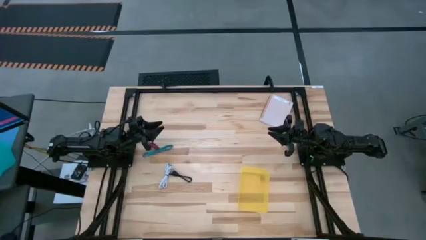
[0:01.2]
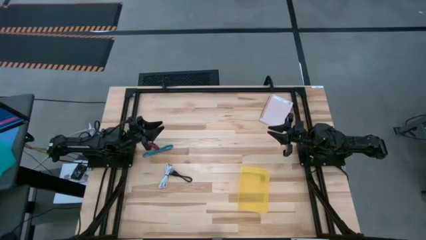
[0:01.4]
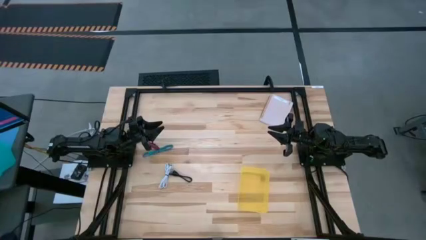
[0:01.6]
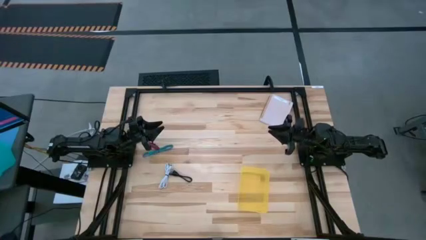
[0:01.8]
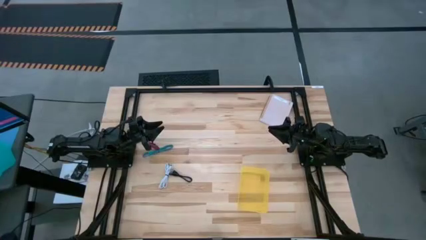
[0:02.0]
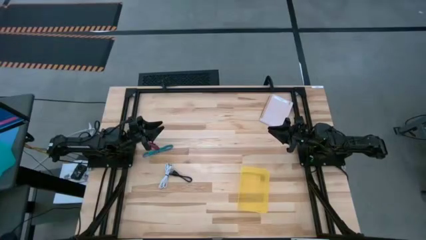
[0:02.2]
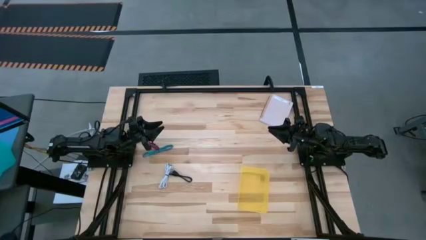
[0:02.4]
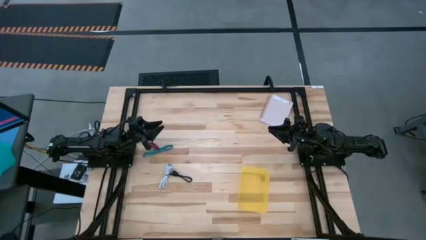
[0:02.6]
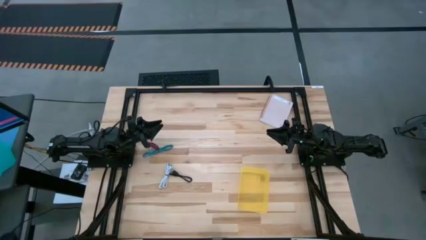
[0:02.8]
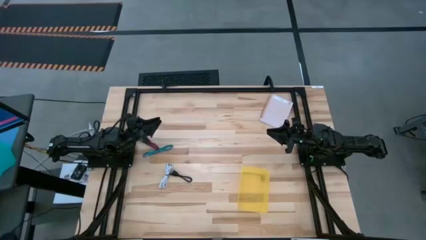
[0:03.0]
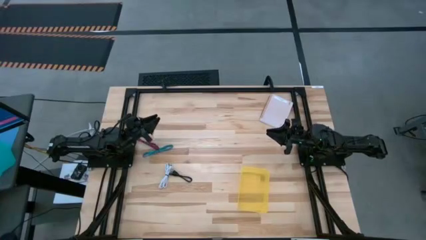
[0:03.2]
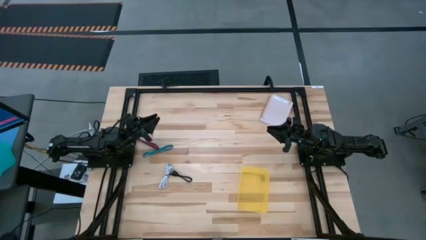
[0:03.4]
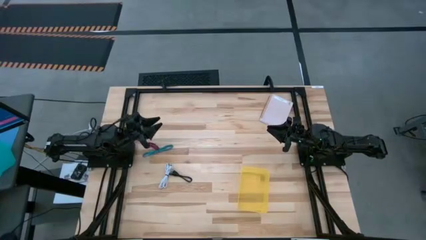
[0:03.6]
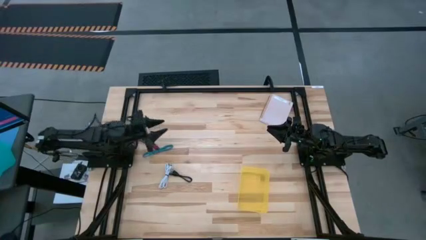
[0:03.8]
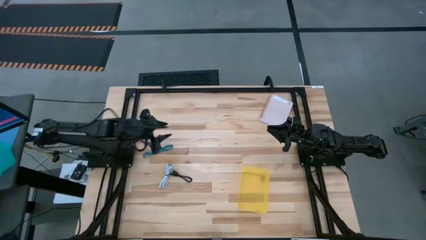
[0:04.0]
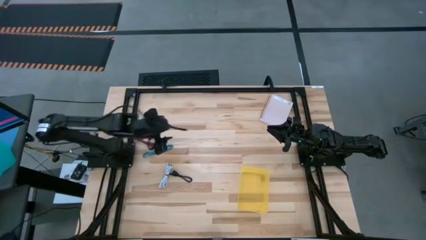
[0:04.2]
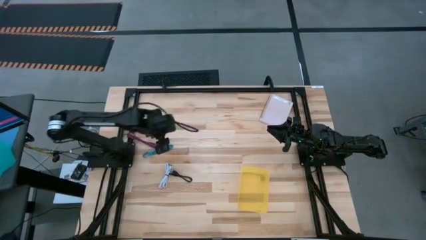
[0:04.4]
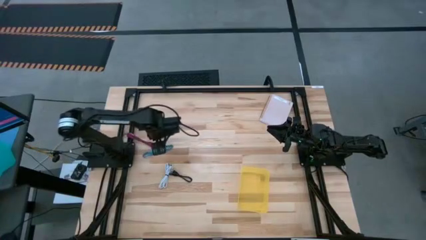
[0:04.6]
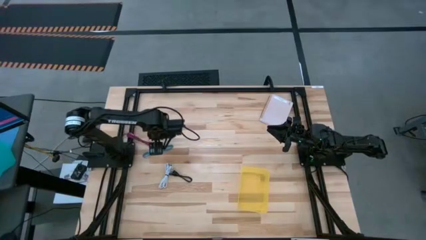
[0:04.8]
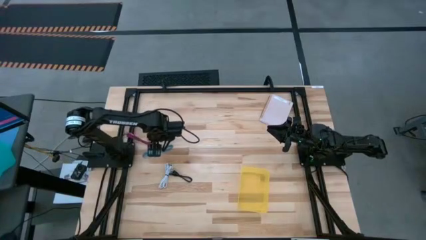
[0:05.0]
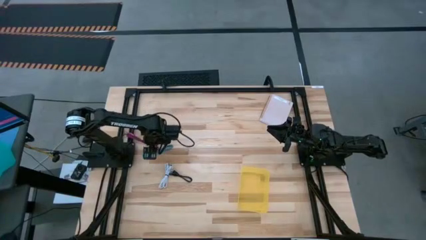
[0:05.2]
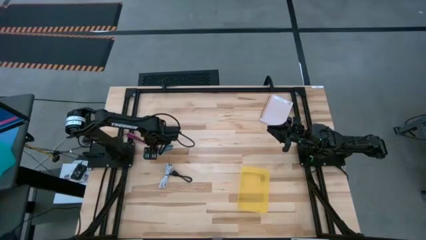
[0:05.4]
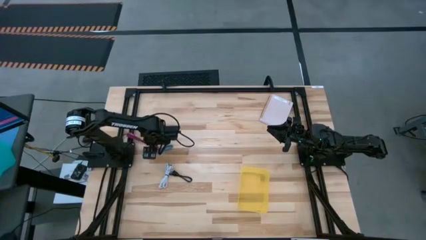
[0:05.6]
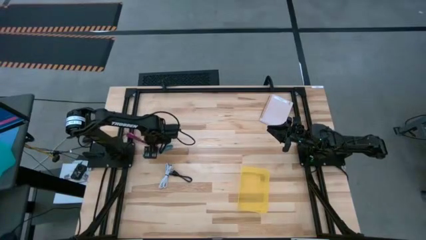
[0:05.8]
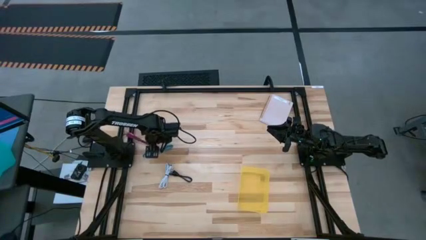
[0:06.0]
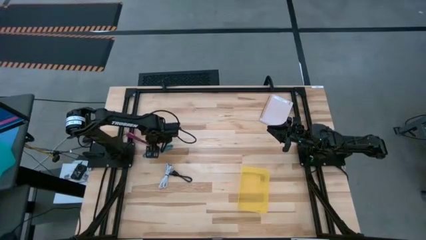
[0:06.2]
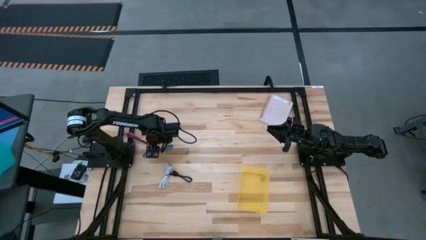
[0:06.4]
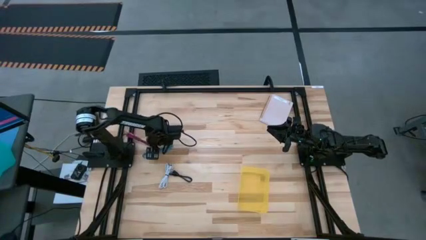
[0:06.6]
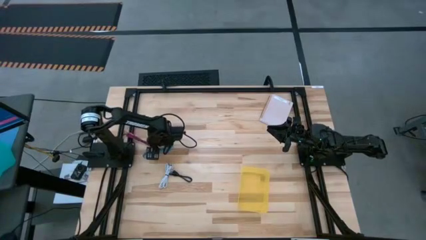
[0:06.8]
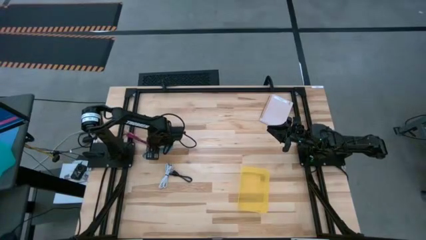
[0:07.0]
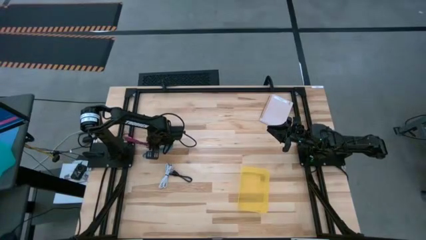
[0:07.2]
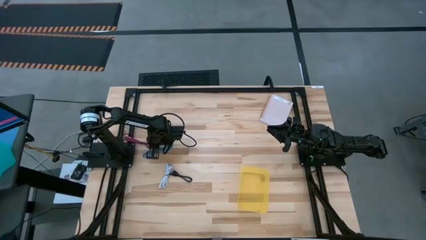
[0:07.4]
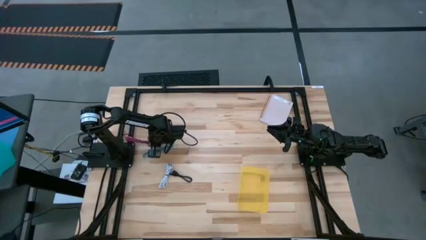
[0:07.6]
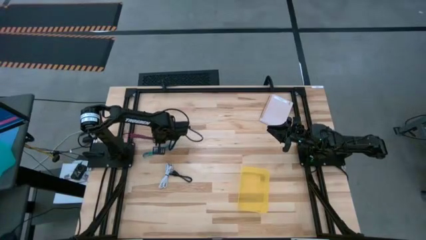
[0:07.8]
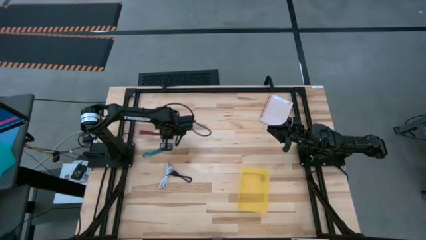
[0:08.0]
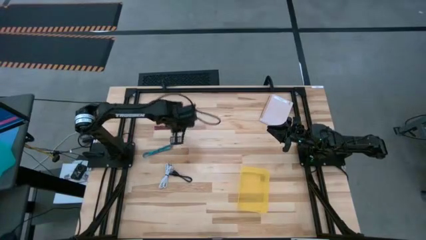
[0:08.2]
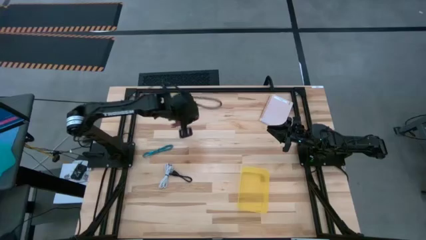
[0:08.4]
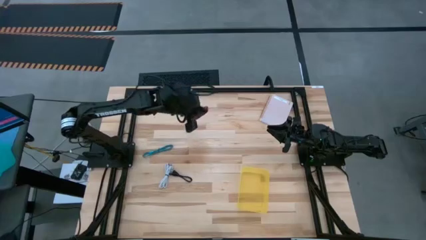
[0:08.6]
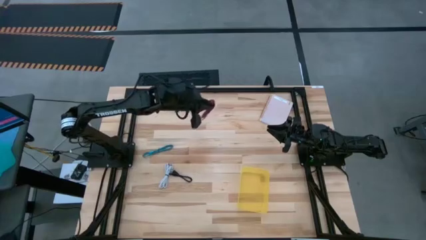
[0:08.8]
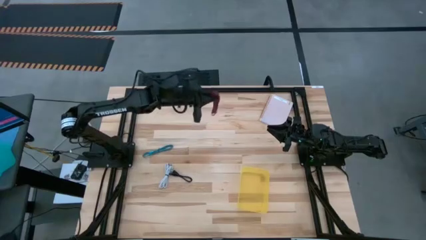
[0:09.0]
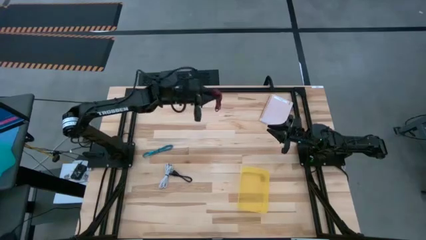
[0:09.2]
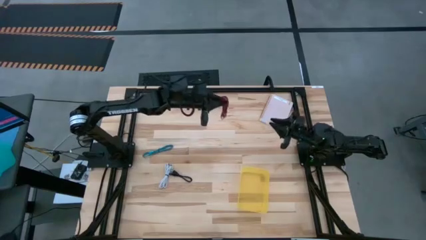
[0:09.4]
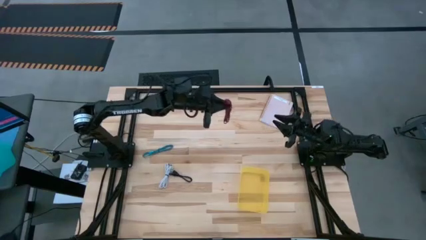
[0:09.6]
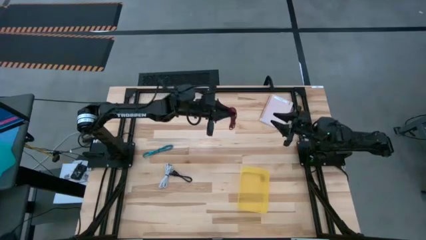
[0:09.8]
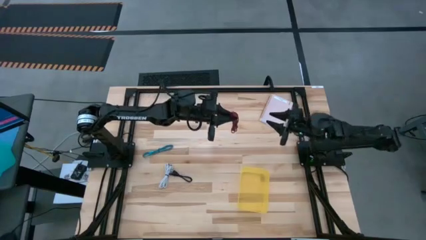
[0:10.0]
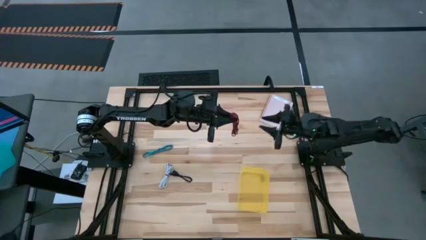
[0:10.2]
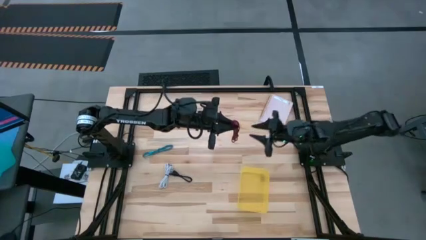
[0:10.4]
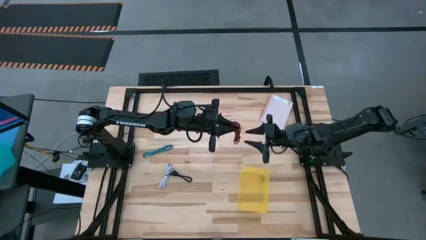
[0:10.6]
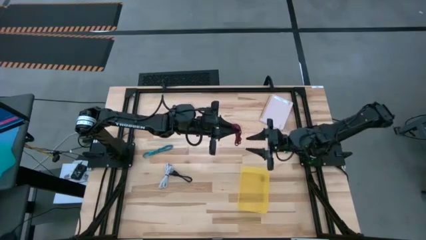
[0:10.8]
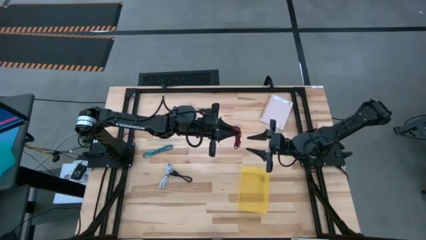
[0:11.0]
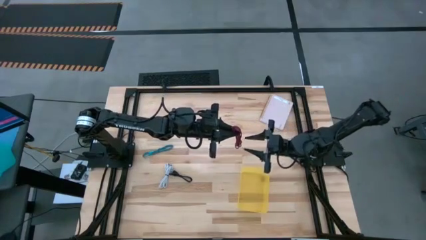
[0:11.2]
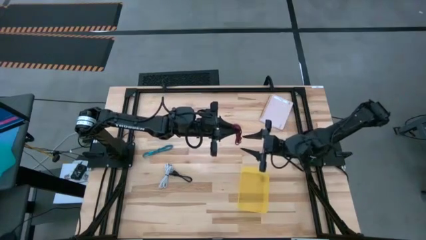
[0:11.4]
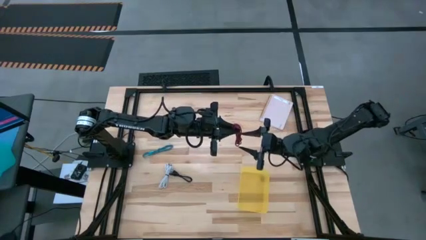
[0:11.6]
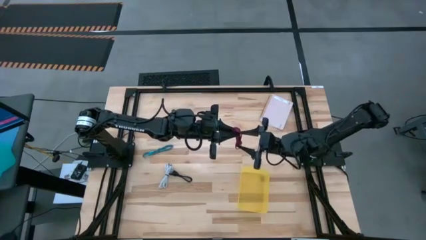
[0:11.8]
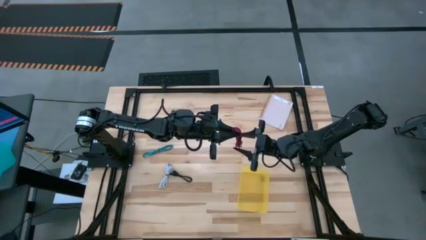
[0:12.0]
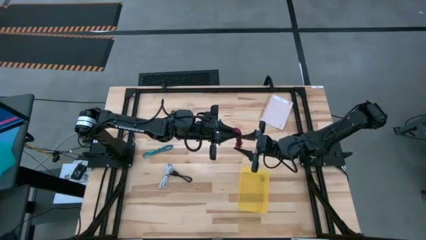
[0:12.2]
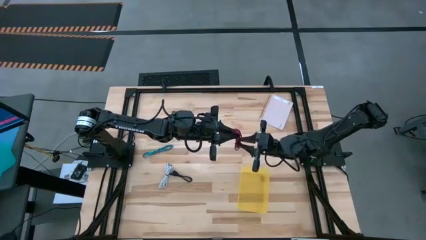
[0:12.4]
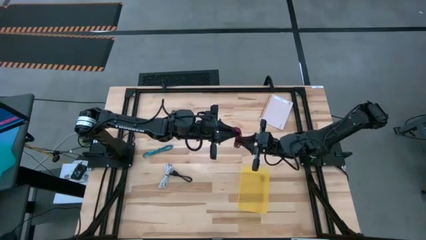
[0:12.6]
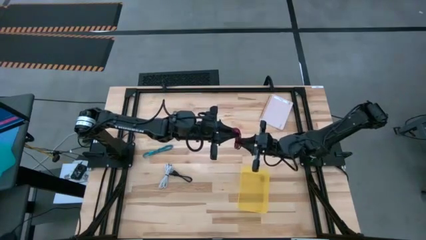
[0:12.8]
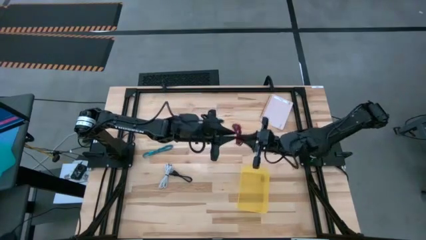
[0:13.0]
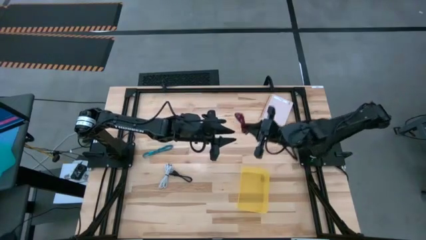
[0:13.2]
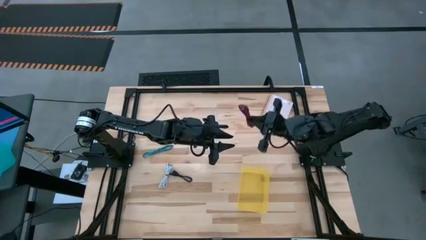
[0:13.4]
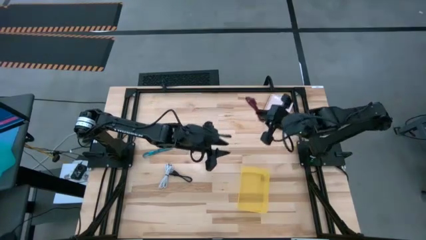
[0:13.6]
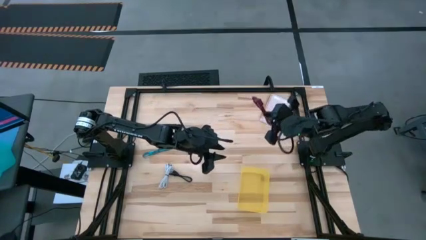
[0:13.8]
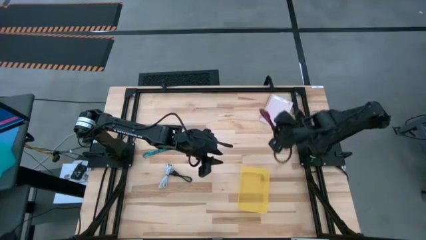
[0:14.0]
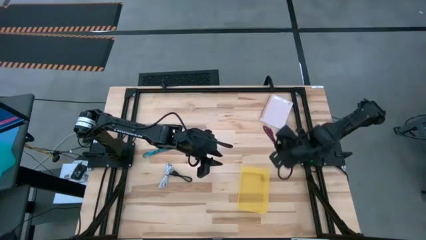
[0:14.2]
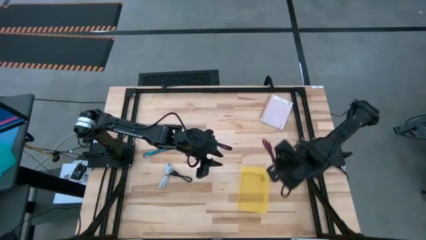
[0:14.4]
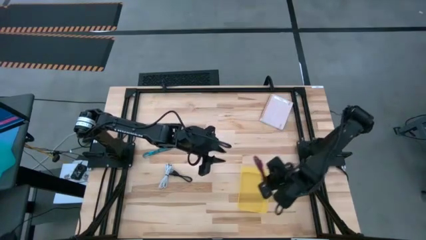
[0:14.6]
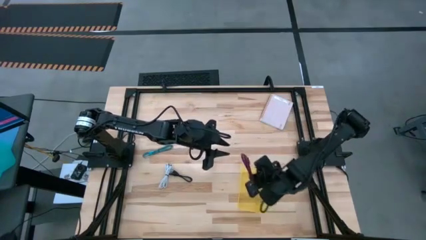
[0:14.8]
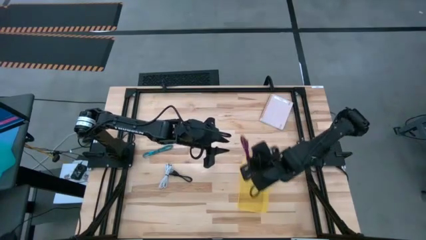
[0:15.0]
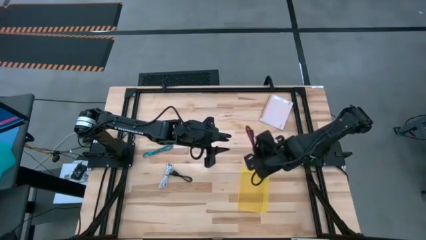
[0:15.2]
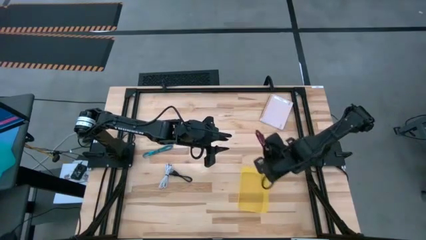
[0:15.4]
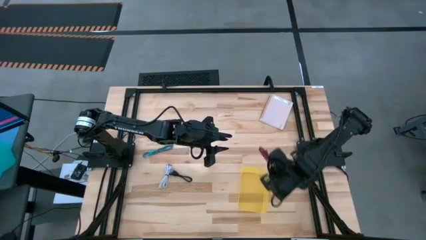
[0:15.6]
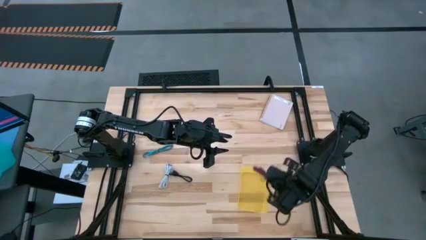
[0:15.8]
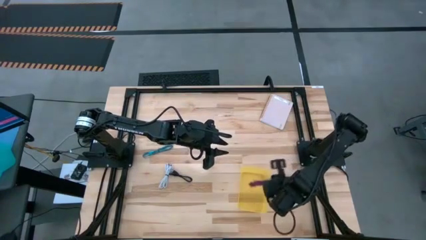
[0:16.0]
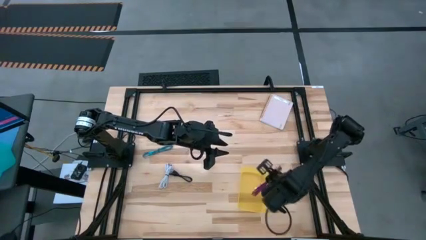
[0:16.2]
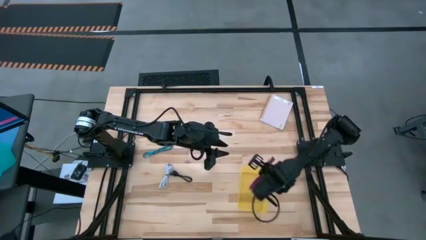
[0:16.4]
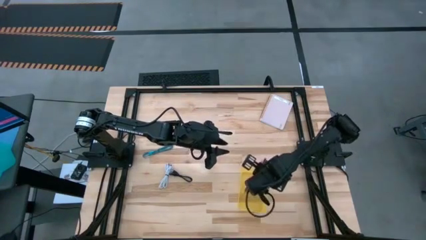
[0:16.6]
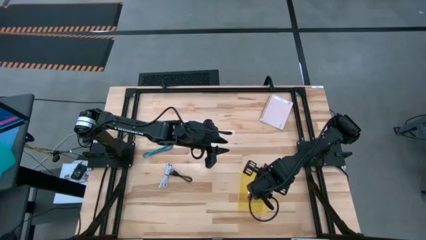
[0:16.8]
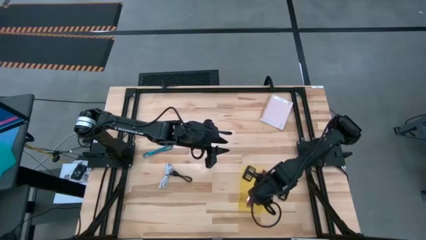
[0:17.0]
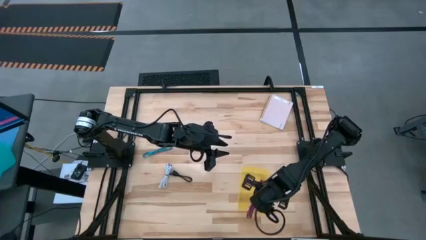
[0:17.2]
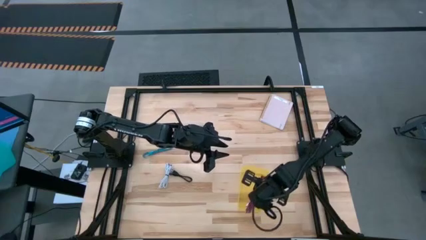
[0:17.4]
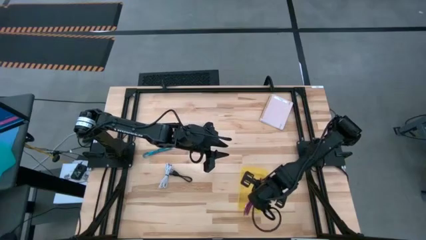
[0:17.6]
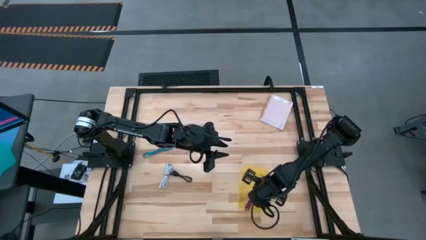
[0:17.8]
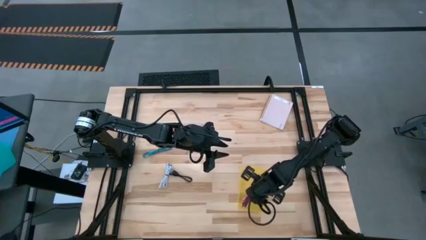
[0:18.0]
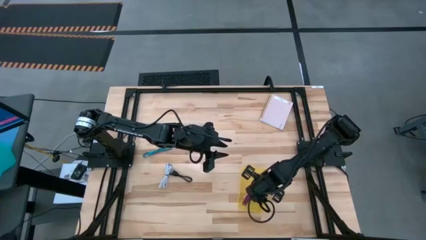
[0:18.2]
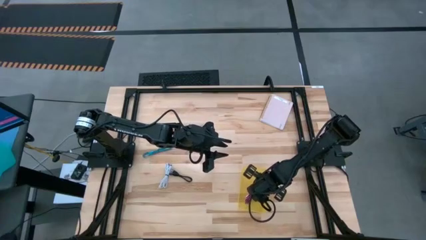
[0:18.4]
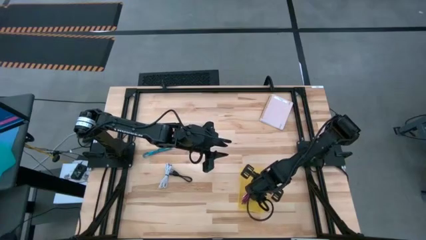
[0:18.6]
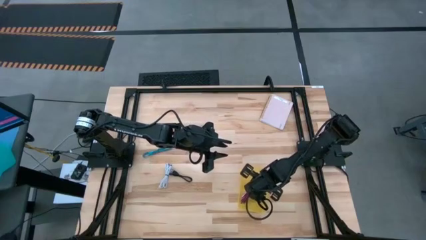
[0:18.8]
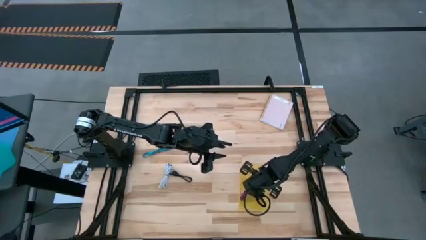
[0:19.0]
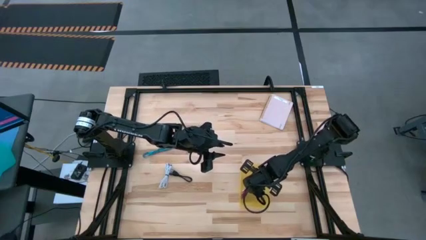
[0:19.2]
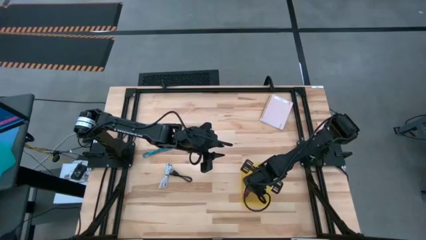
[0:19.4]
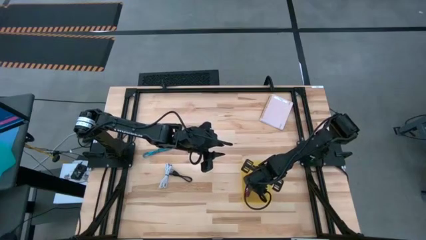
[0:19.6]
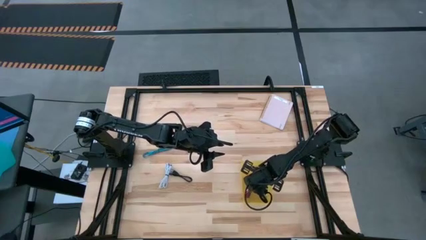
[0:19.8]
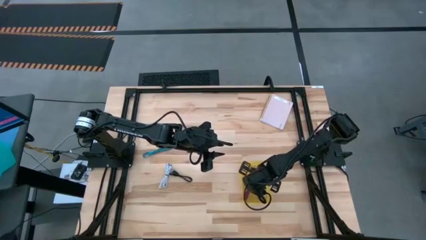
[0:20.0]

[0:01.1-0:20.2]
Task: Pick and place USB-C Cables
Put the black pink charger cable into the yellow bin
